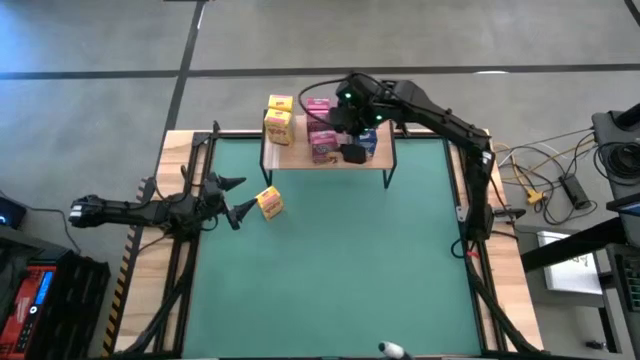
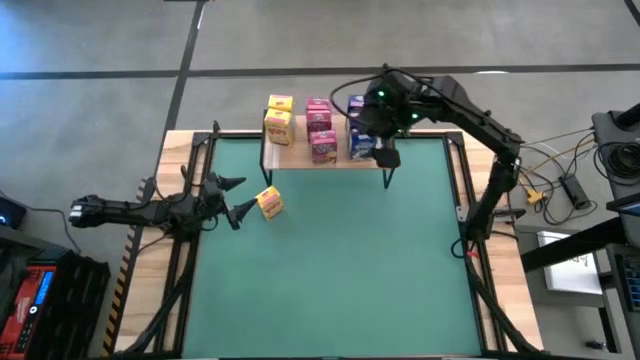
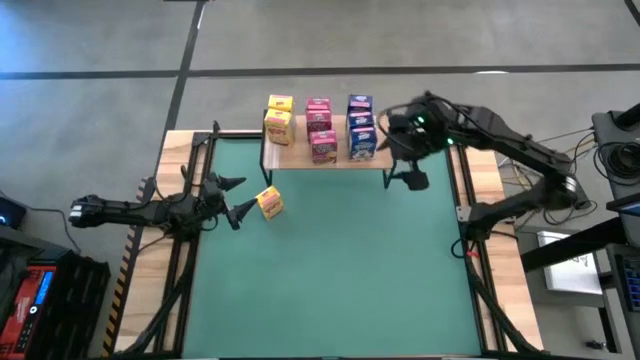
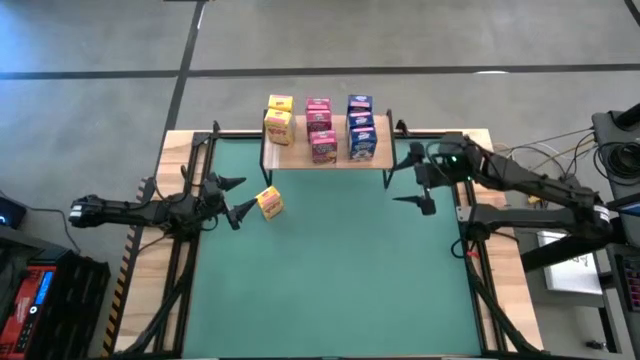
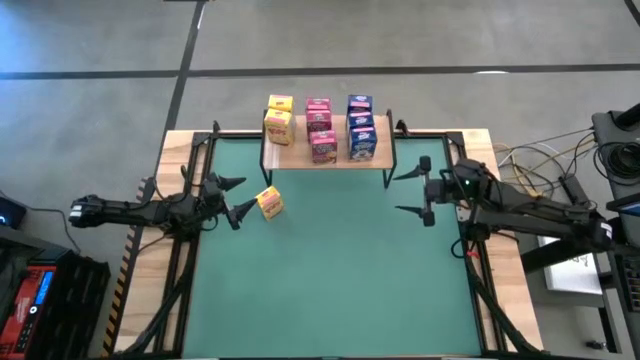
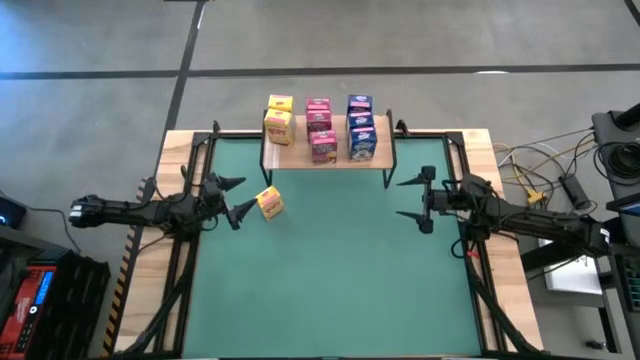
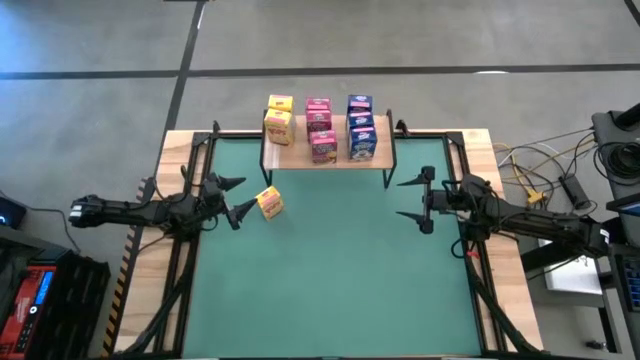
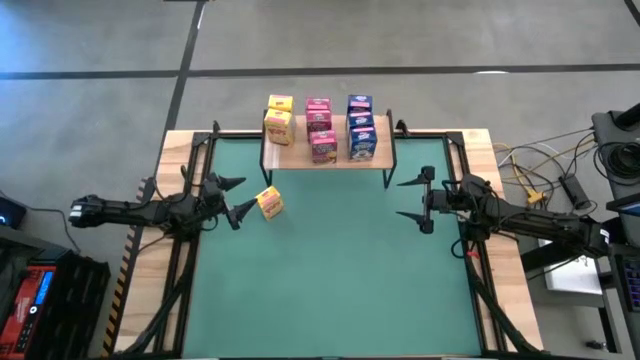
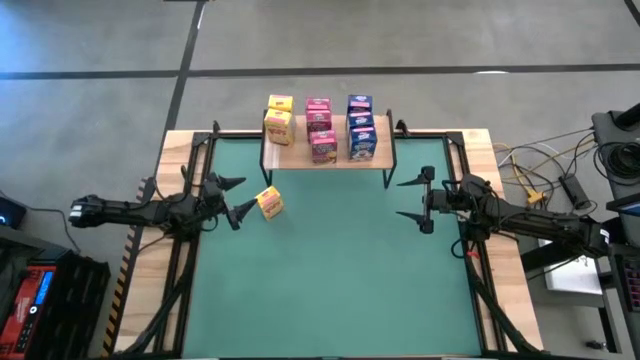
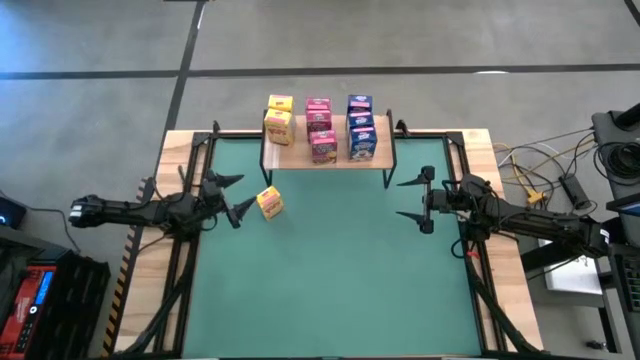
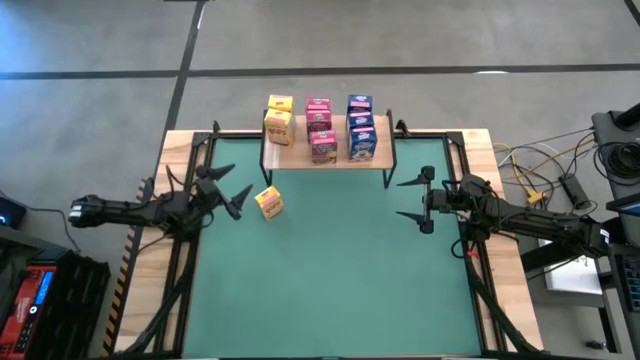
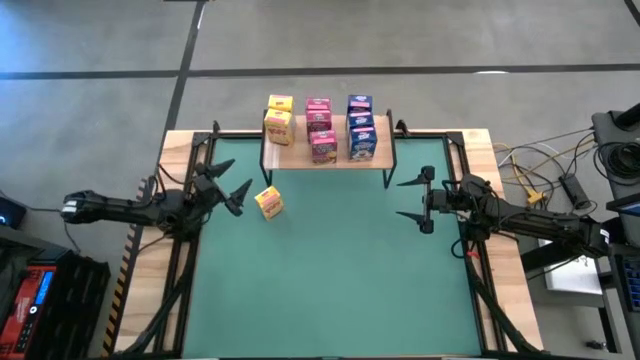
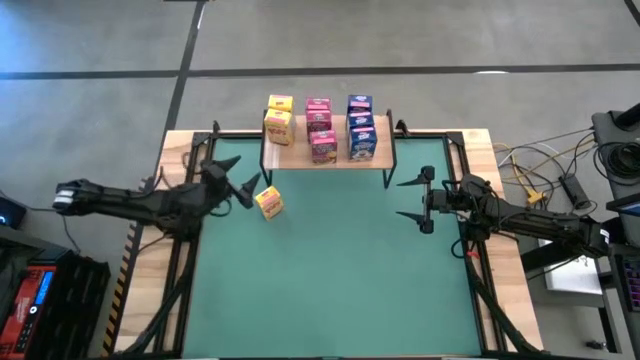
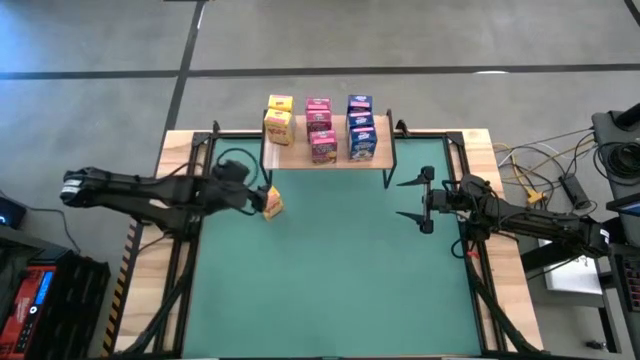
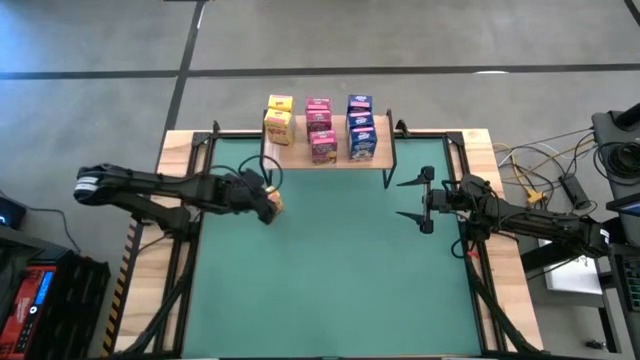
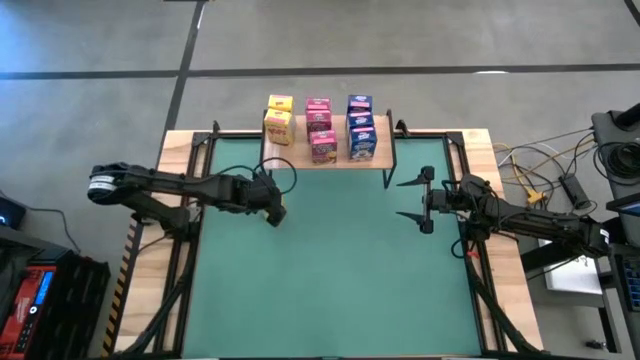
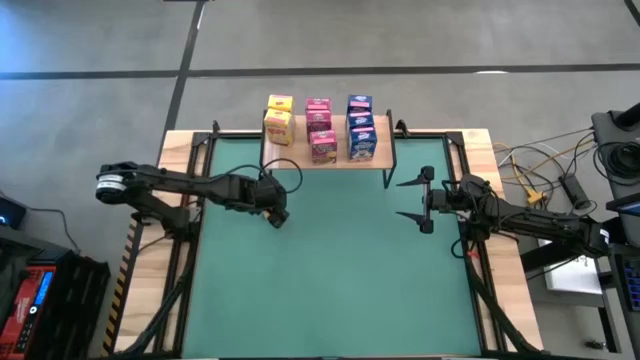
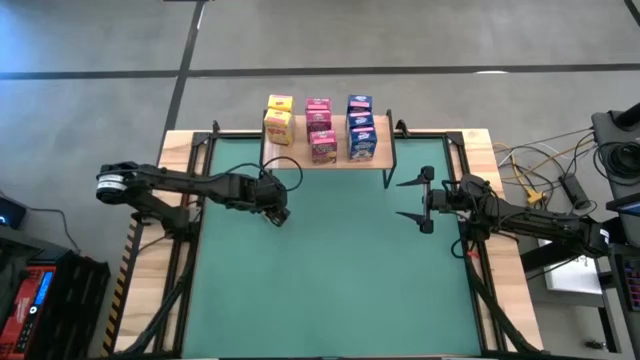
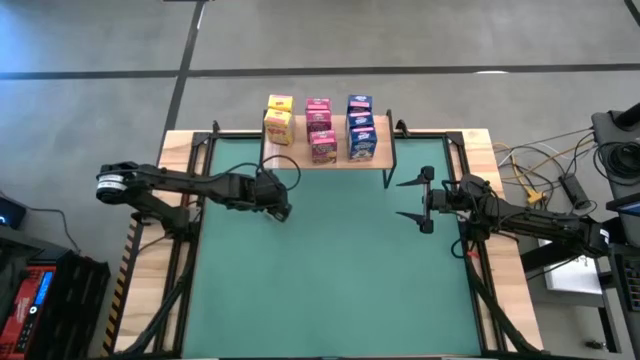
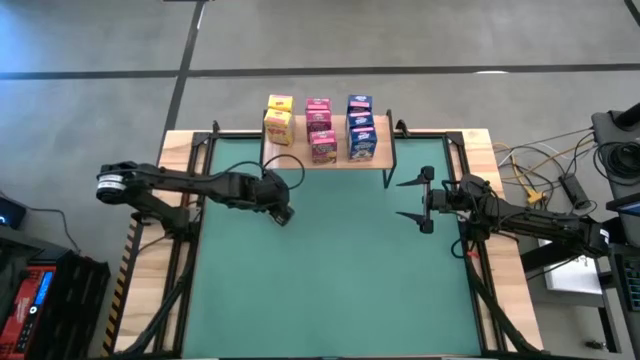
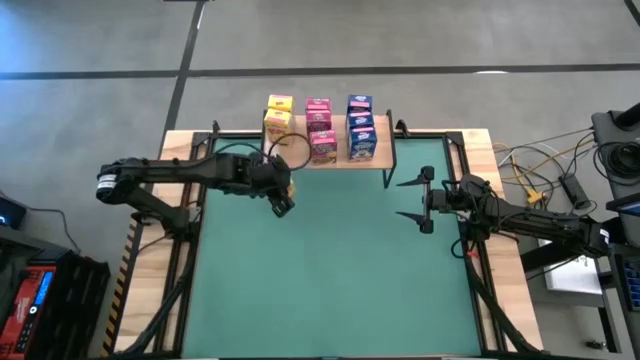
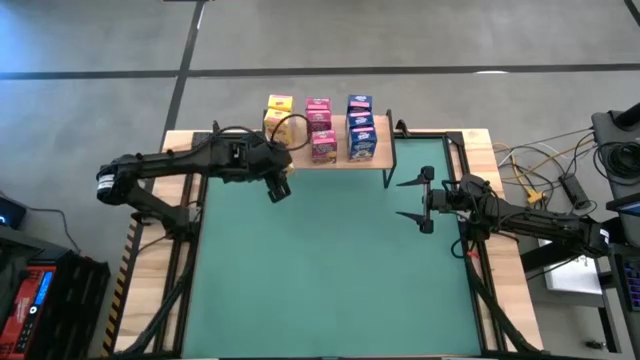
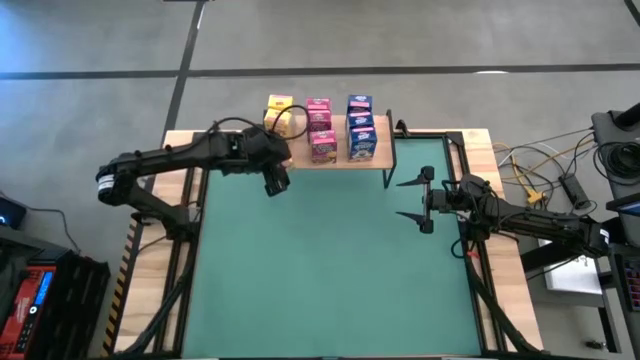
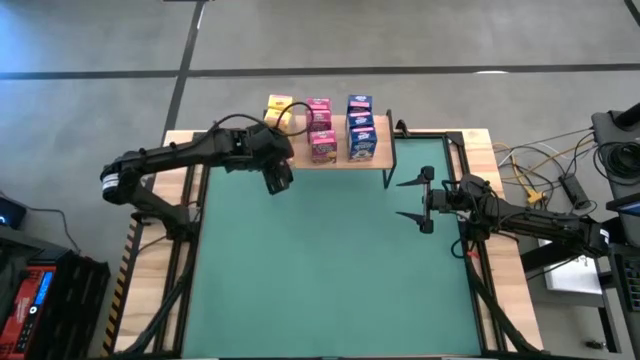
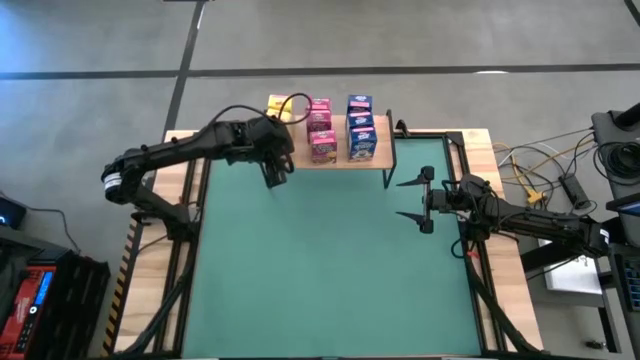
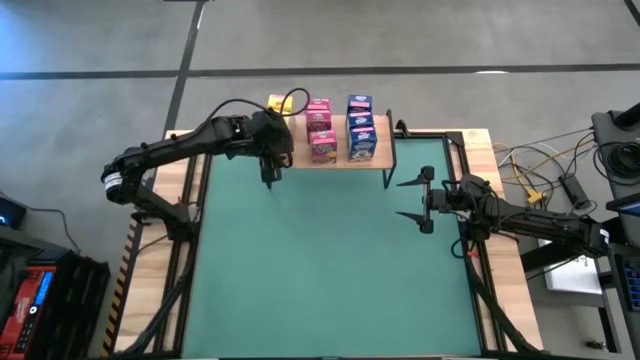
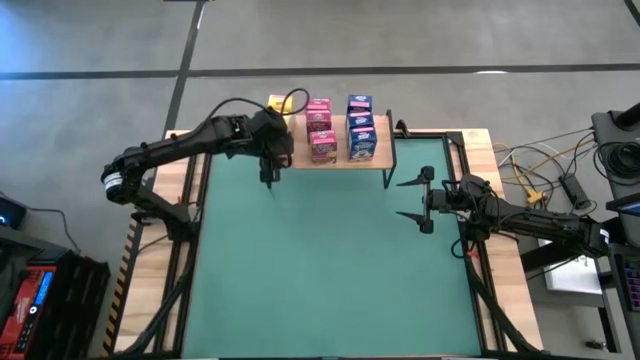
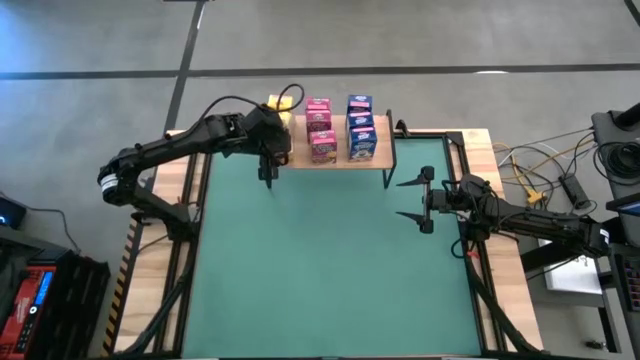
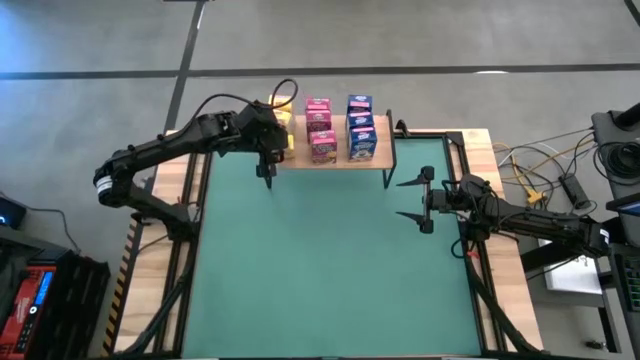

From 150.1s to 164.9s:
Task: Stack cereal on shelf
Put the yellow cereal box on the shelf

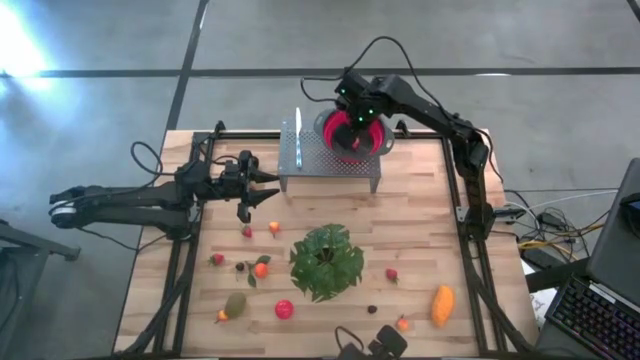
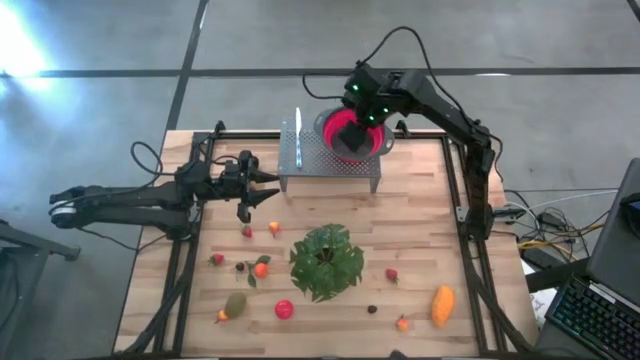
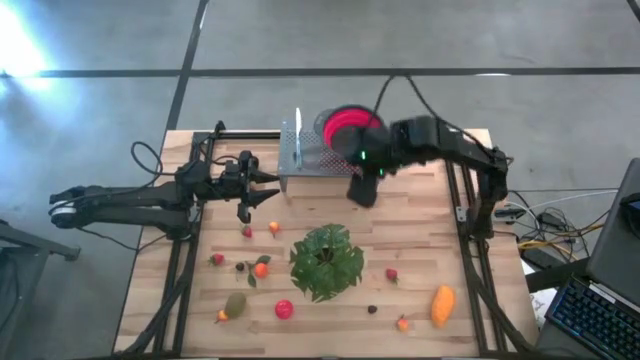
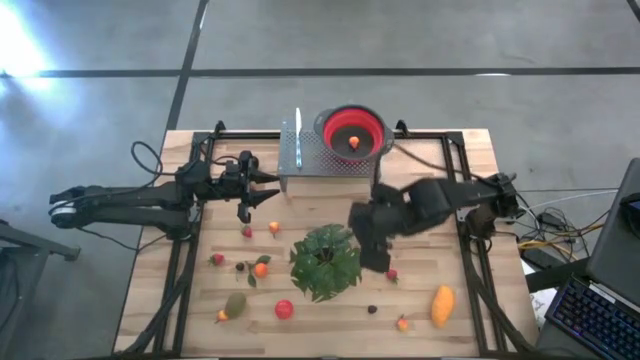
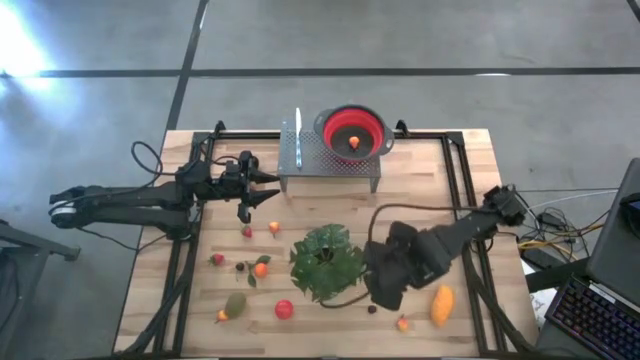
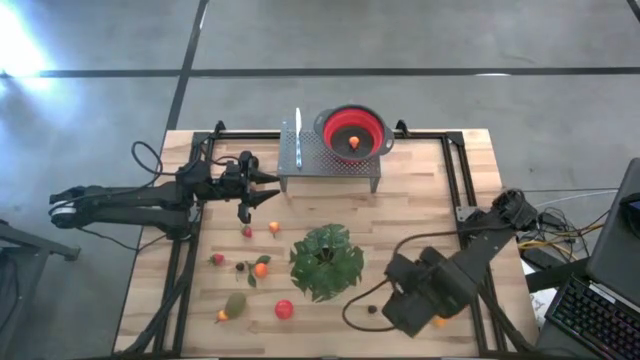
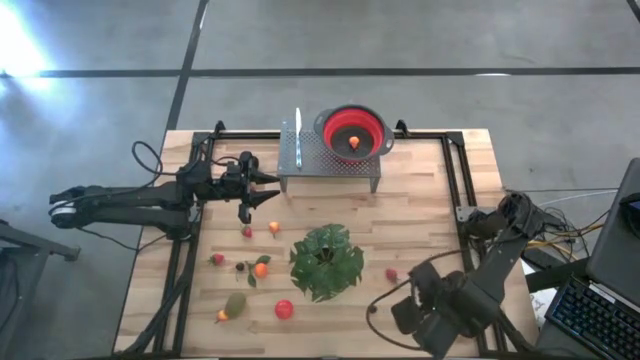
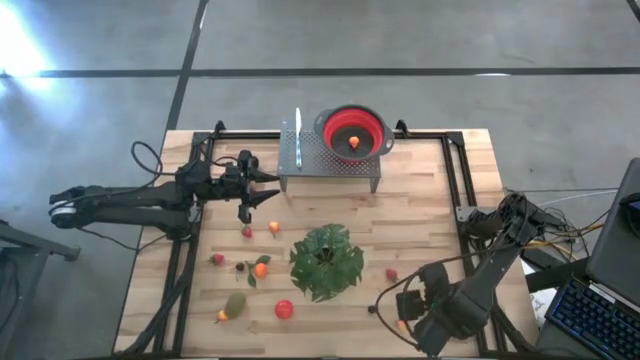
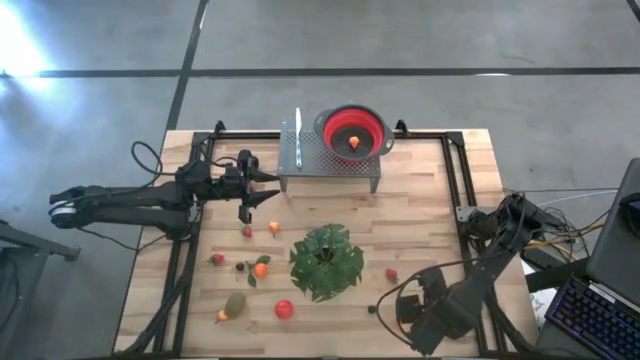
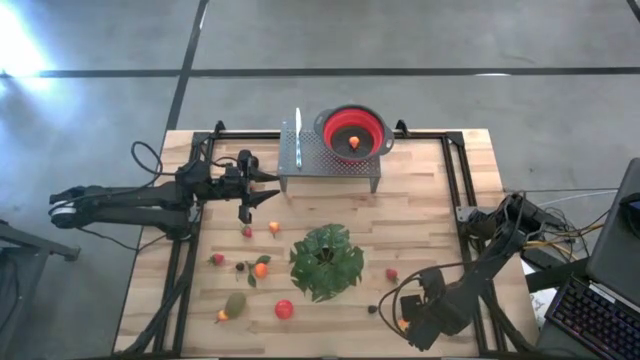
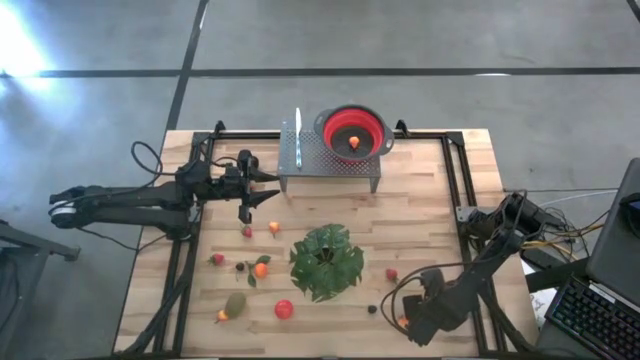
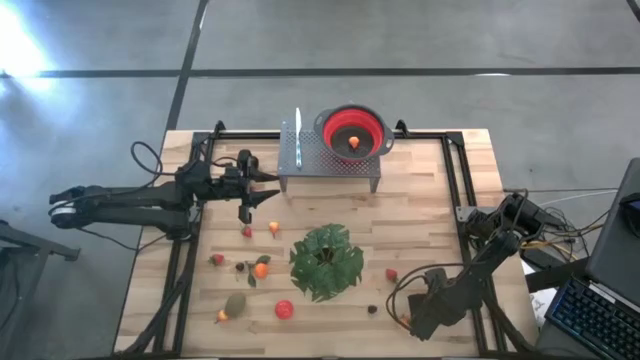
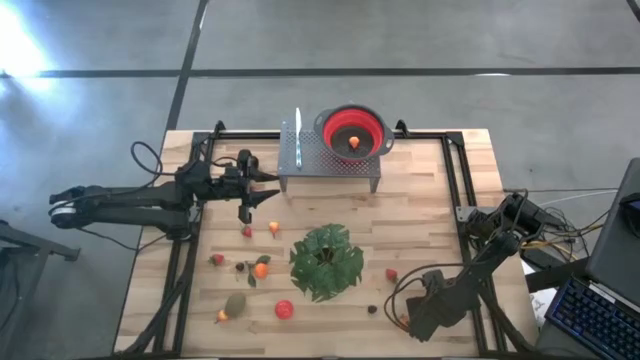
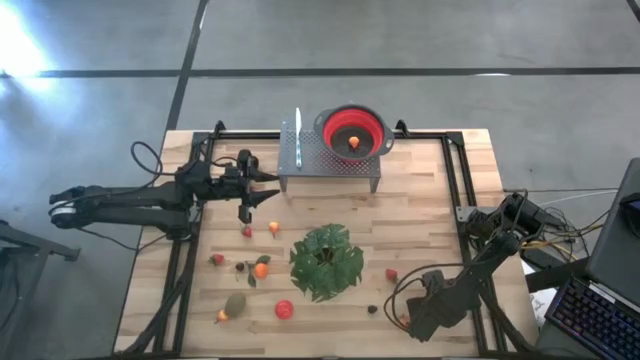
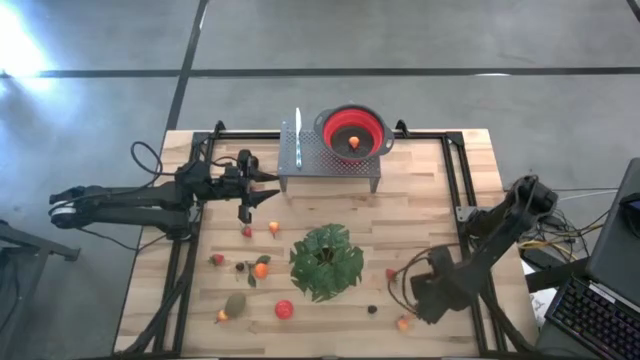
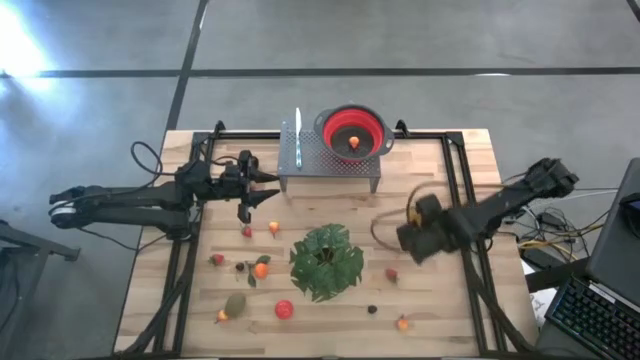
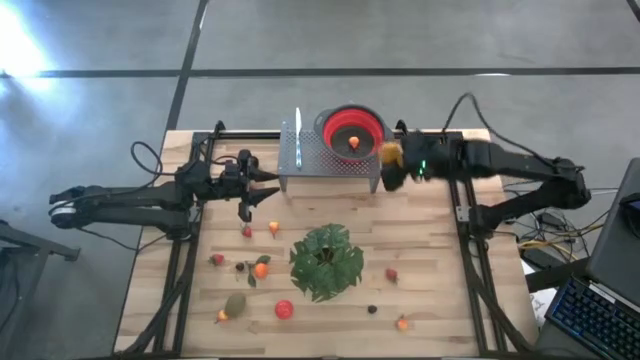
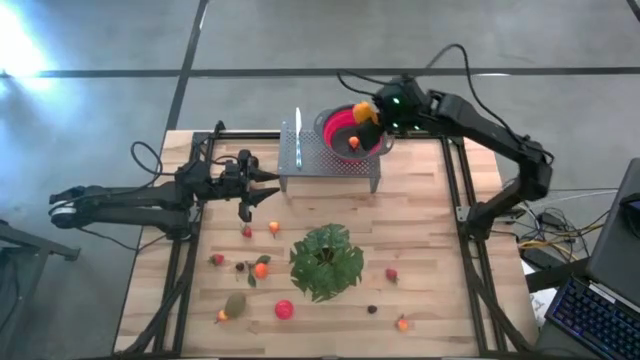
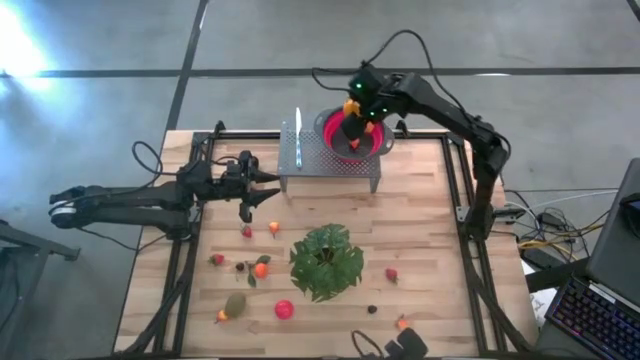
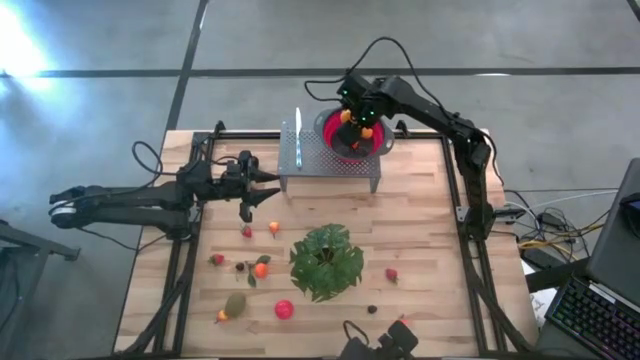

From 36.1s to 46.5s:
Task: Pick & Place Fruit
Put the yellow mango into the red strainer bowl on the shelf
